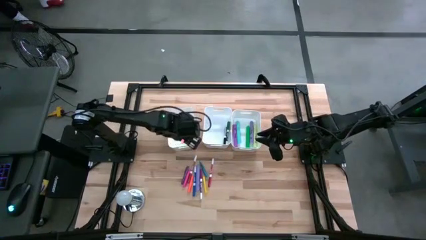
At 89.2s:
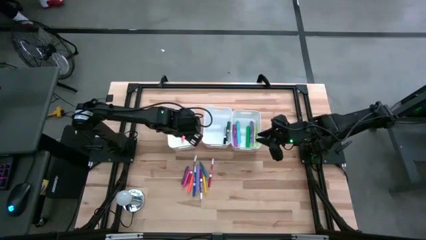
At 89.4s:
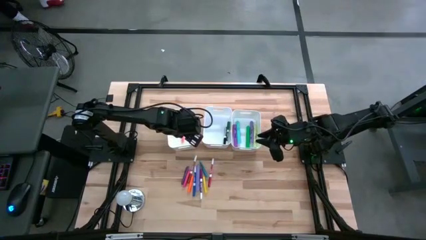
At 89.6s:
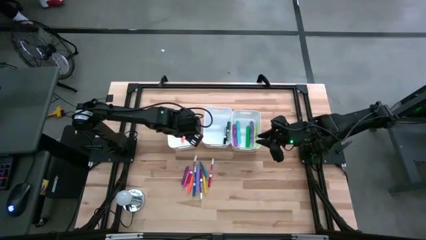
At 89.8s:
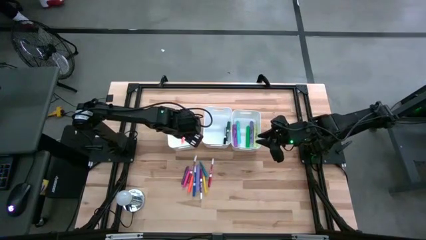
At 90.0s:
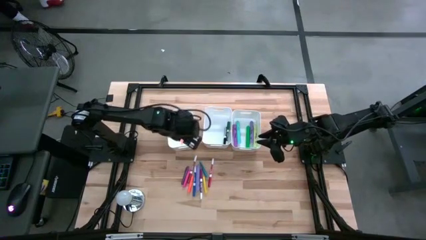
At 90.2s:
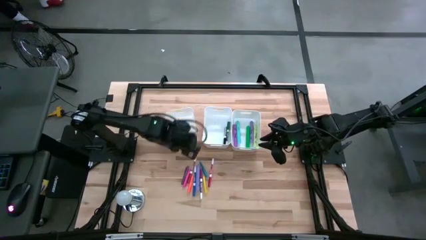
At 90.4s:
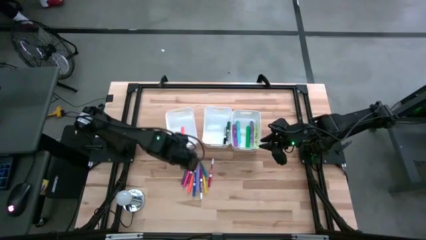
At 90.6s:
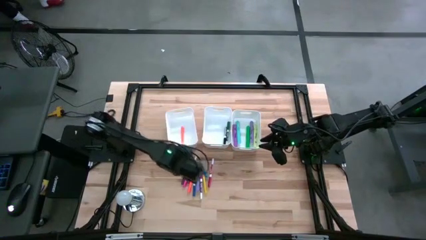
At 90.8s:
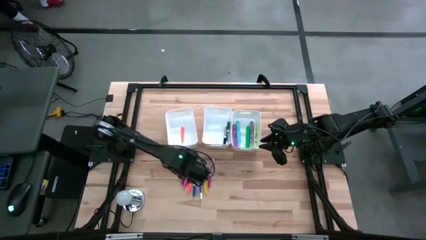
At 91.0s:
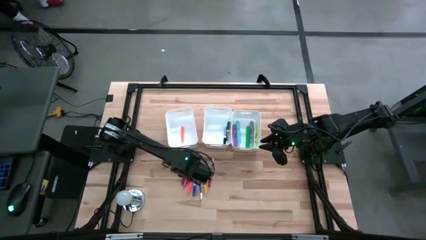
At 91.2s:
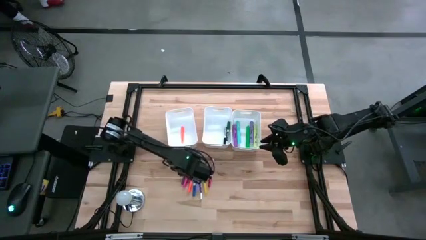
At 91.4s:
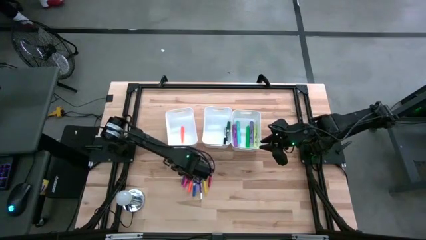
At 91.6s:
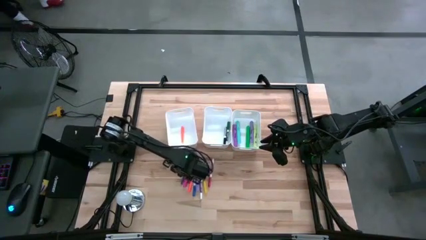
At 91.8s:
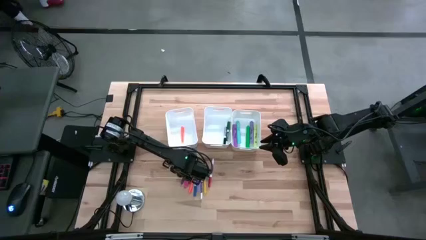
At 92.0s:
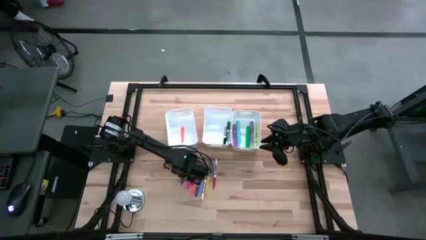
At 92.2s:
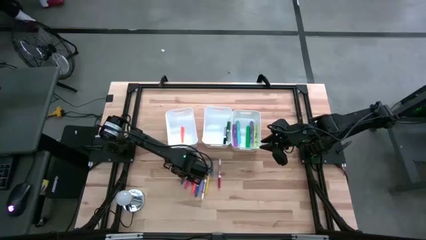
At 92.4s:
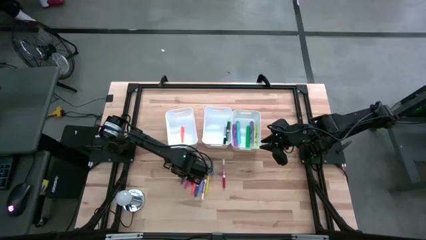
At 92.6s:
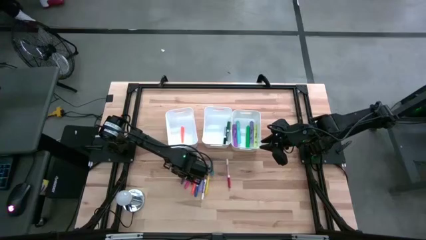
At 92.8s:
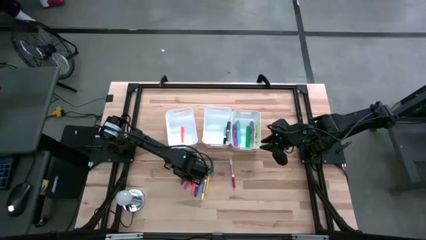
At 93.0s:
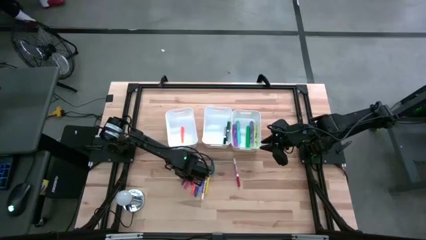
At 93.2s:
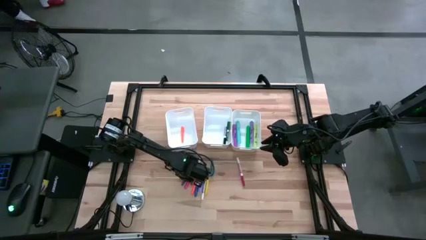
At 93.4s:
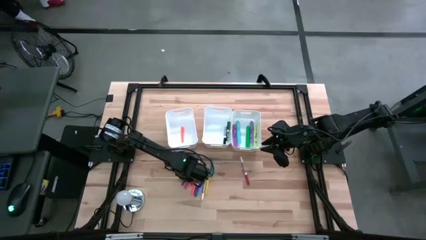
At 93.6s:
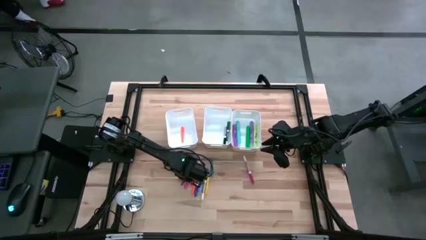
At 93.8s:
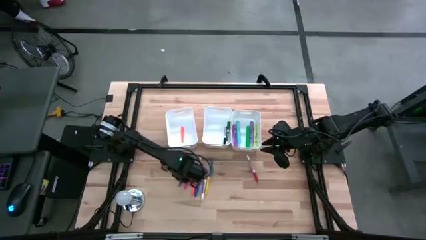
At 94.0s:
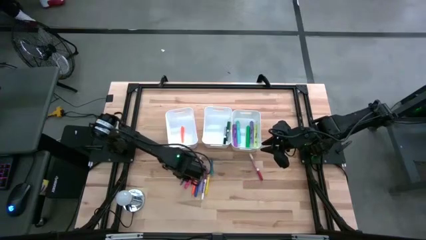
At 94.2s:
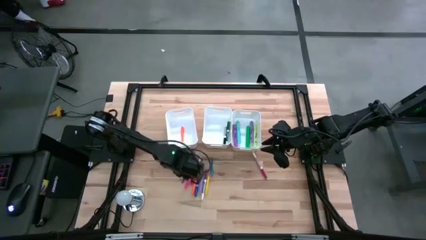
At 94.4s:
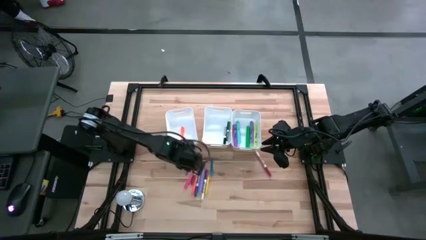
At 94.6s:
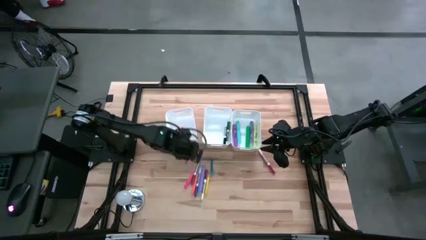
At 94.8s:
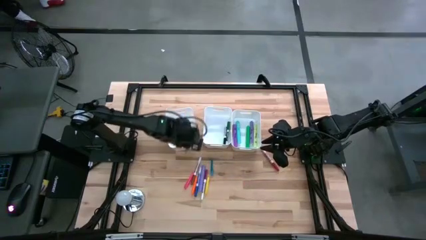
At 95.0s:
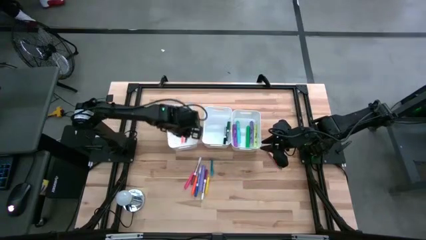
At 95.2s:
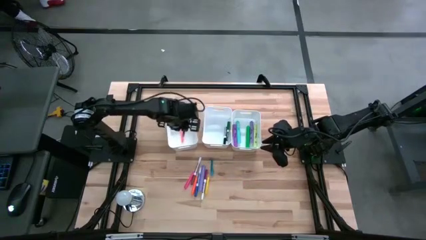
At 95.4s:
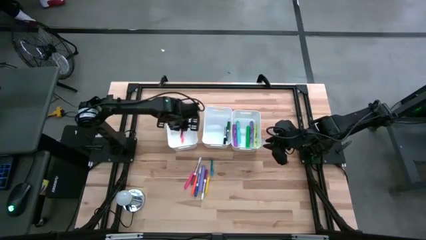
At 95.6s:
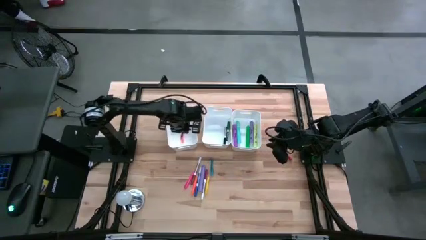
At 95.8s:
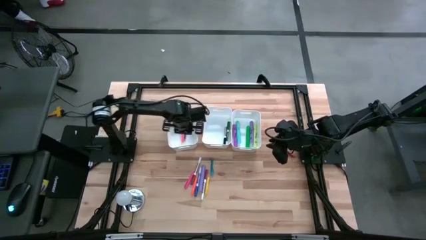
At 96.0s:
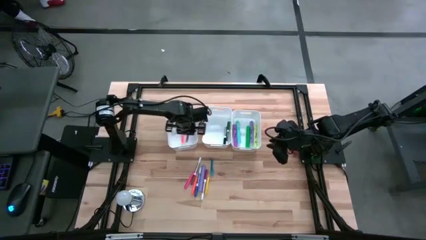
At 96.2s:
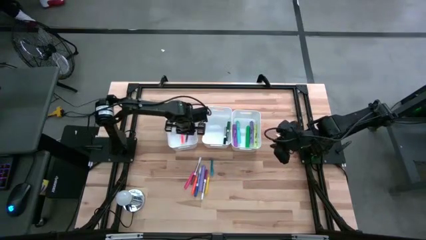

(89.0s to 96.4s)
Task: Pick & Place Markers
Put the violet pen into the left white bin

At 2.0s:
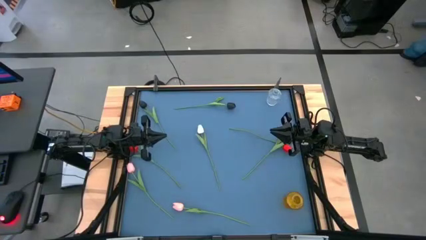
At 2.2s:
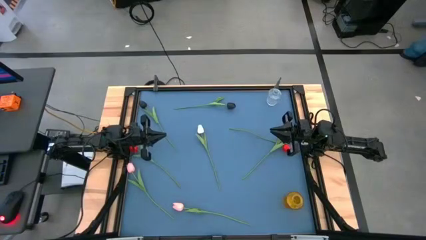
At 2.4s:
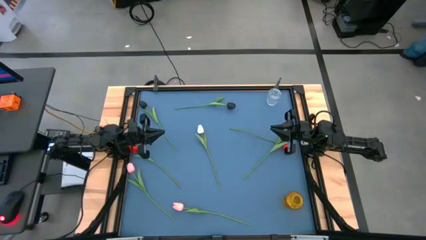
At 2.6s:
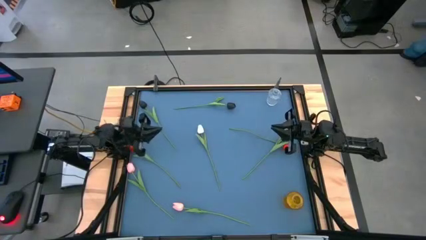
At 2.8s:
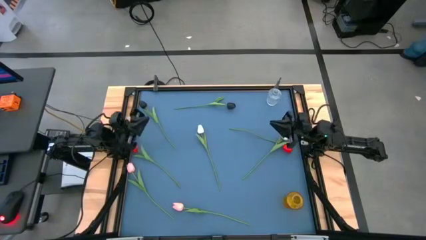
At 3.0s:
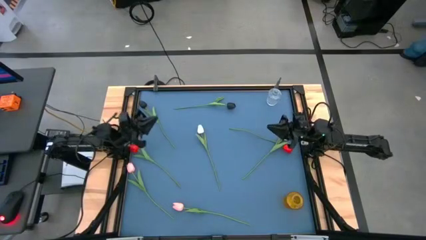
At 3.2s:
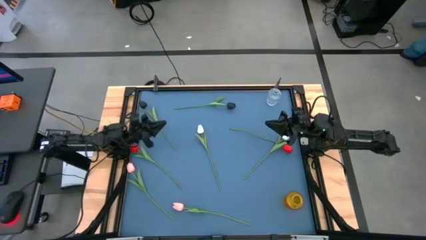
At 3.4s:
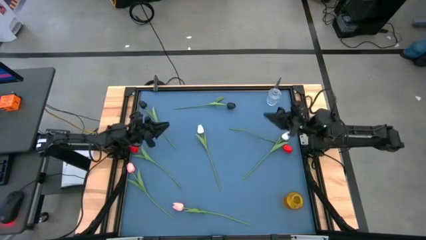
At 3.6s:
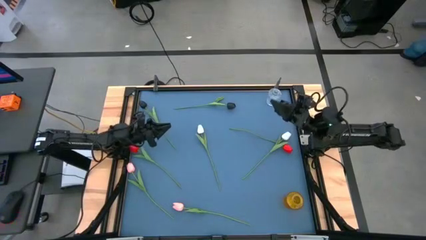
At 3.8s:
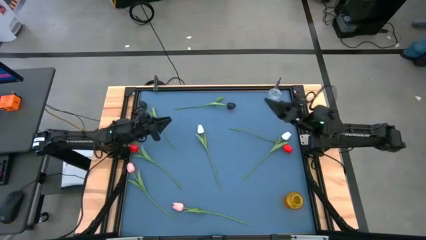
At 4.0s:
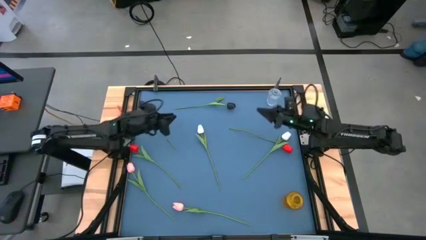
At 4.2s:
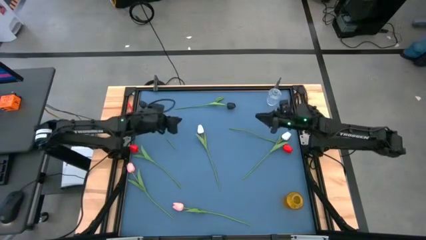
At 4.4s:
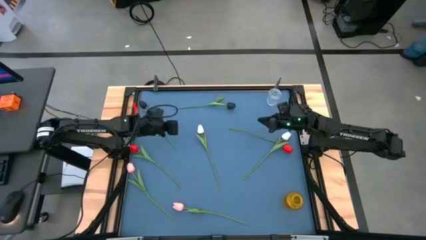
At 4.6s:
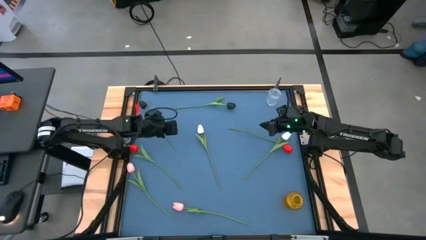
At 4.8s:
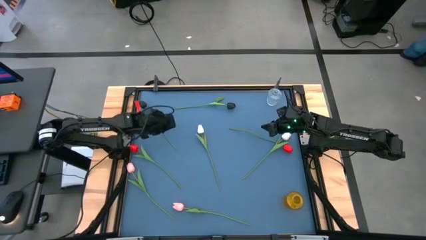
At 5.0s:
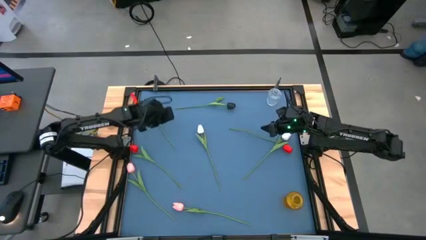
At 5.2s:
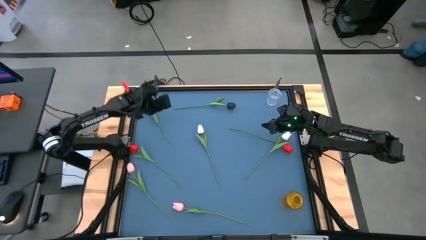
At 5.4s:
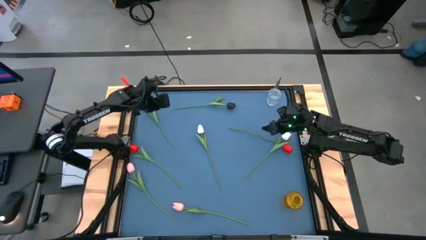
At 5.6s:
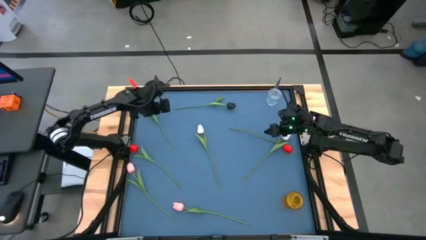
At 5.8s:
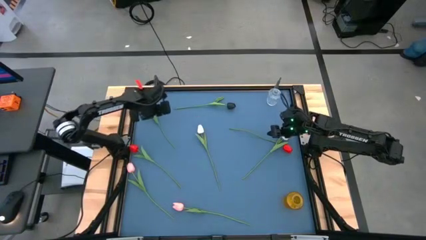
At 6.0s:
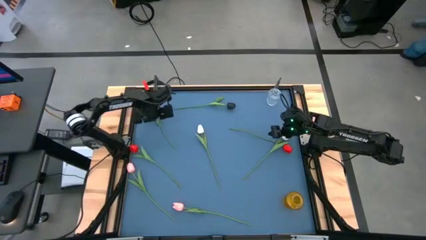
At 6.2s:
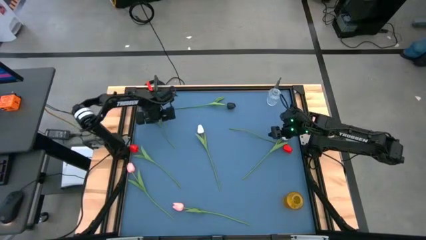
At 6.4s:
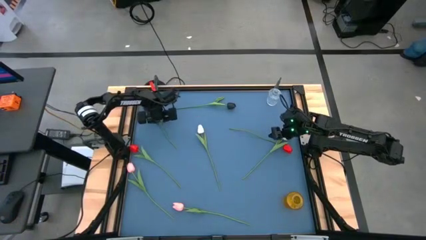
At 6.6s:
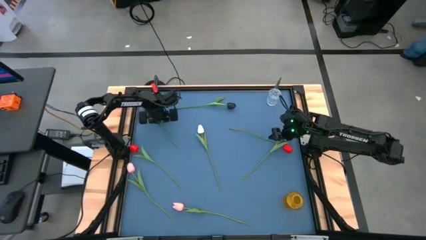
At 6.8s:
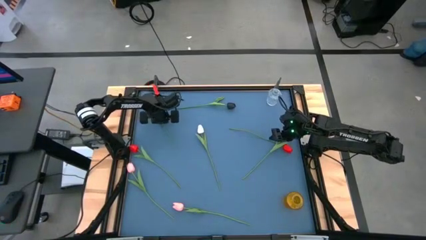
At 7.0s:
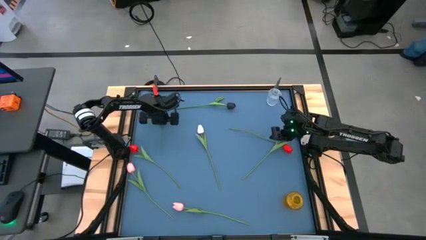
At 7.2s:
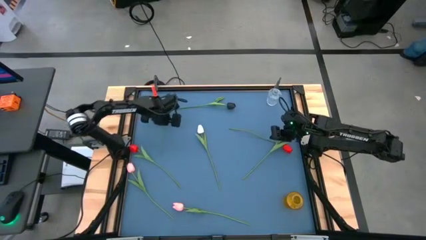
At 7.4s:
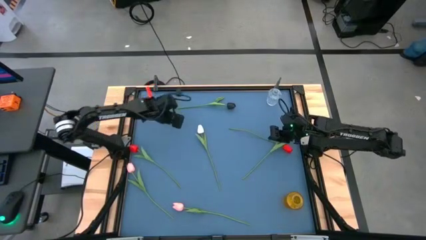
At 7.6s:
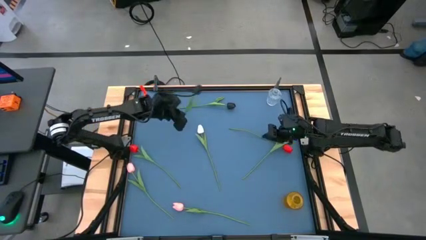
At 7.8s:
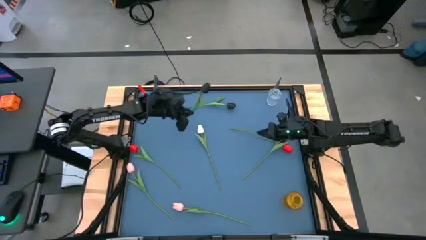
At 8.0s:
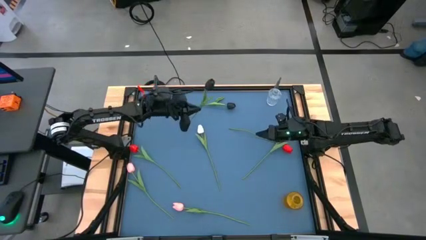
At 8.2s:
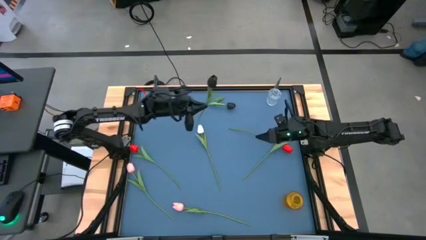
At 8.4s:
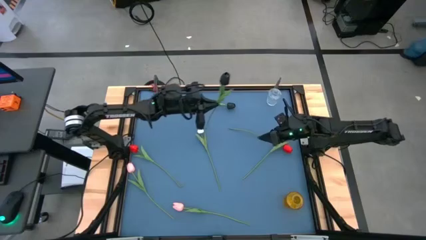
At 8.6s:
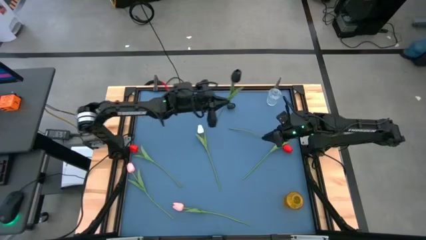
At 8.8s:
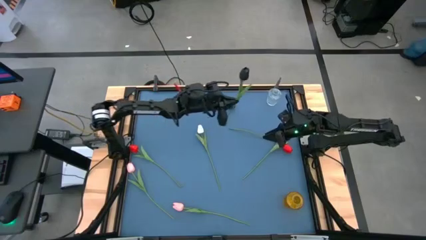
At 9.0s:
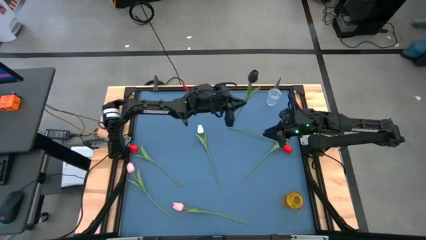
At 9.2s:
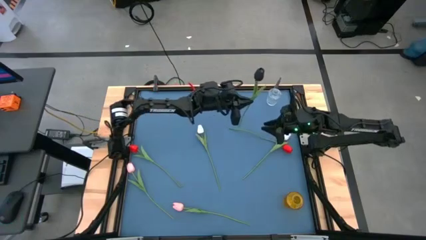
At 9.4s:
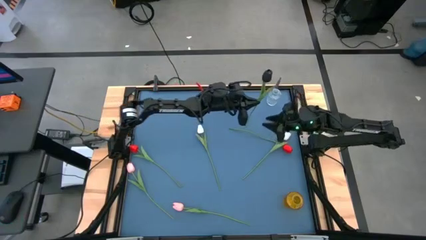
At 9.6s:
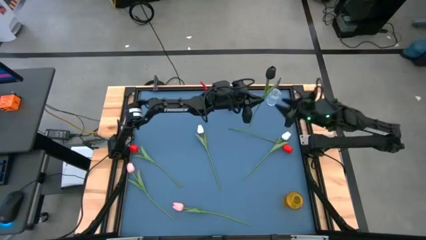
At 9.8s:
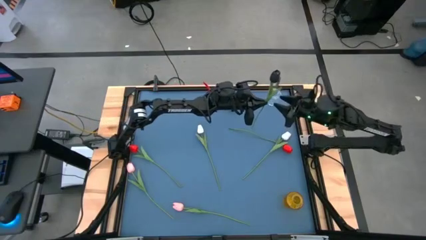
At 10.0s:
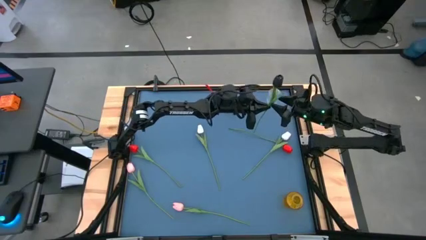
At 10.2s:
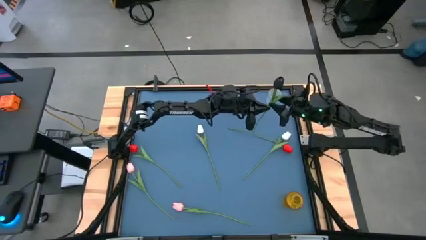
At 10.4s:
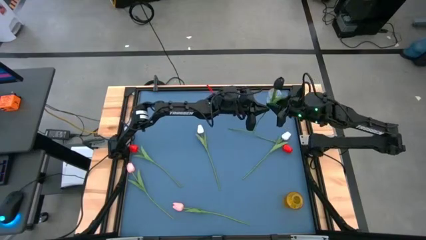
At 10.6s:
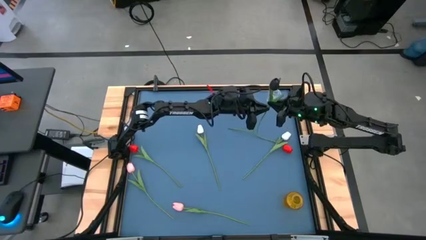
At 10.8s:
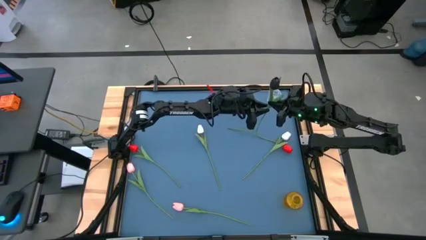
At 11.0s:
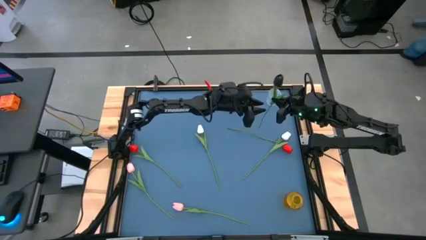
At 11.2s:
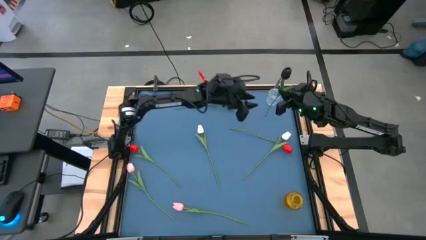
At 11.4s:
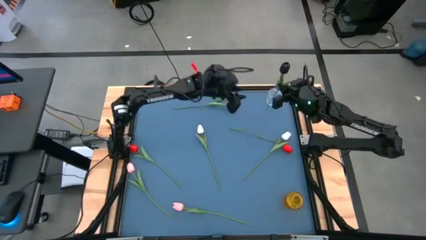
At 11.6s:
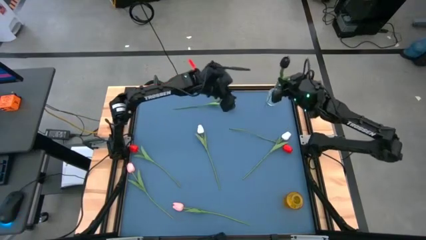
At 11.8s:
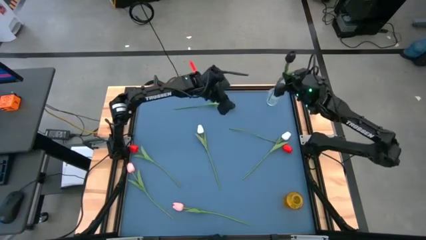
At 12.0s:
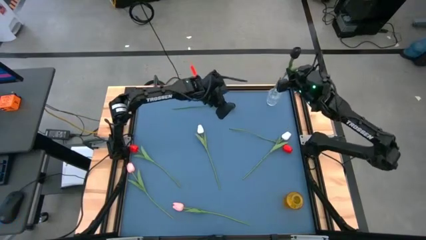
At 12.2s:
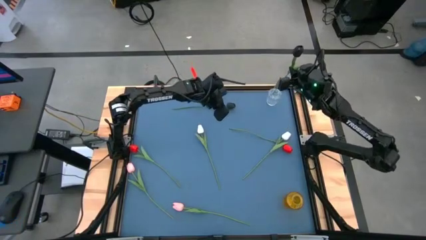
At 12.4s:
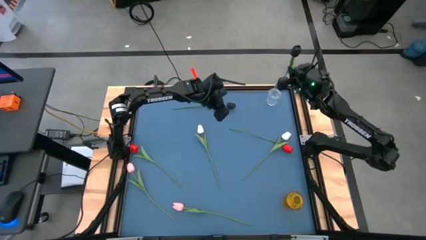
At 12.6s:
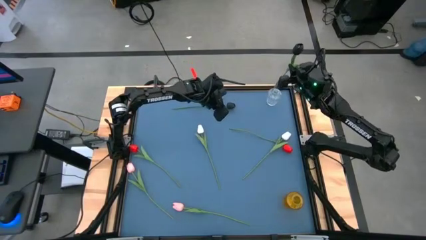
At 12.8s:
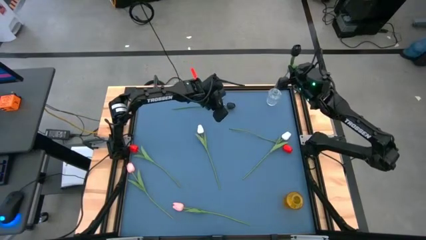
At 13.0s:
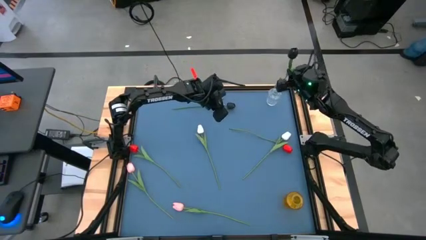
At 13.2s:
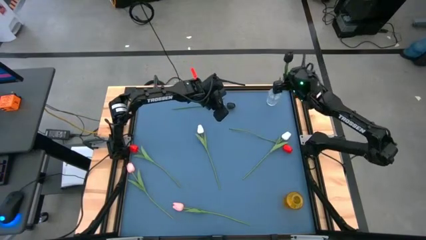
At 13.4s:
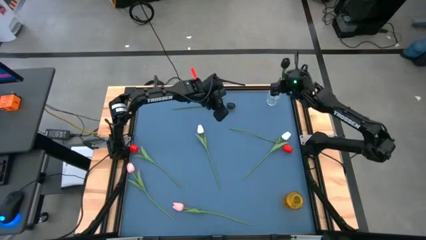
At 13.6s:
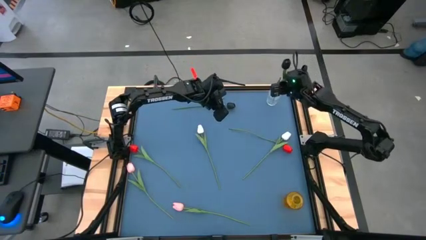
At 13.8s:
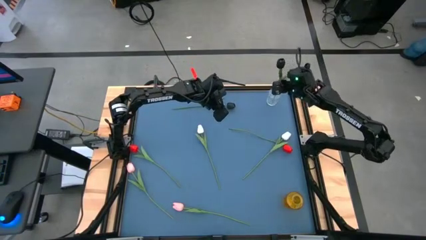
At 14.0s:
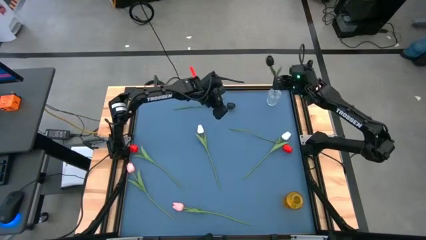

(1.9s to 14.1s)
Task: Sort flowers into vase by color
Put the left black tulip into the transparent vase
